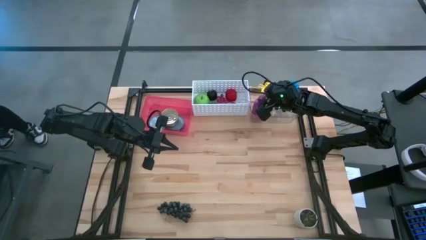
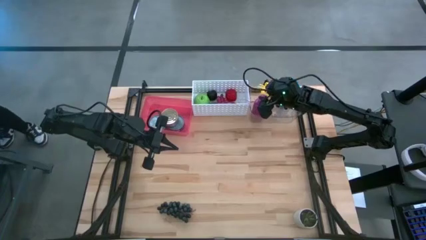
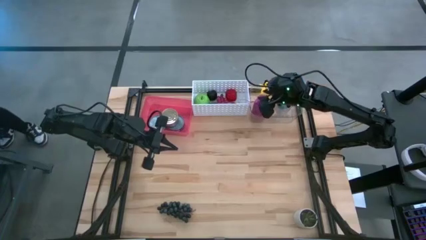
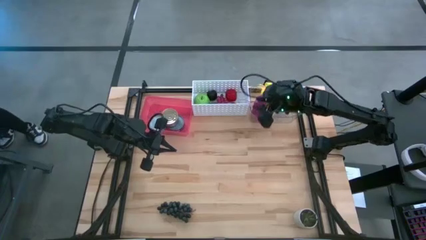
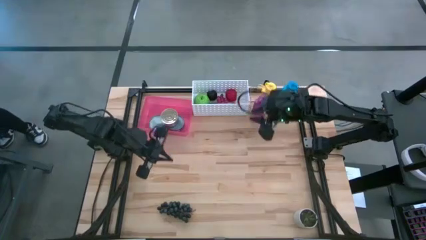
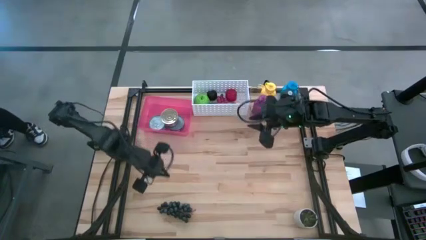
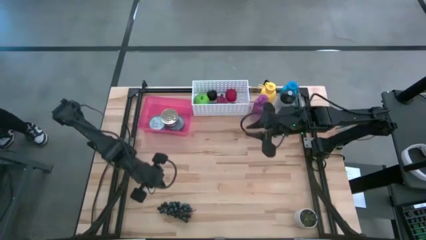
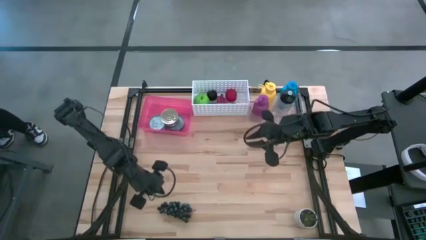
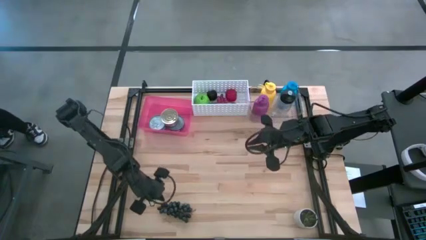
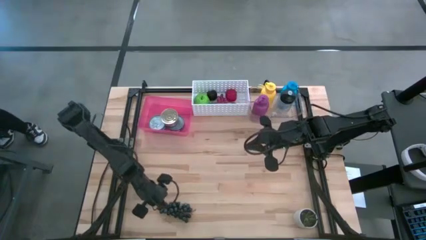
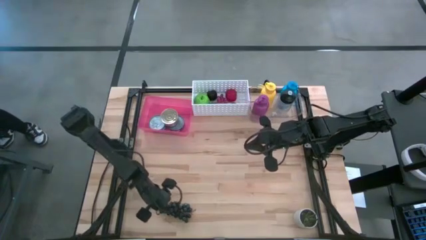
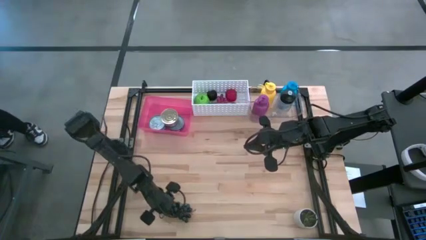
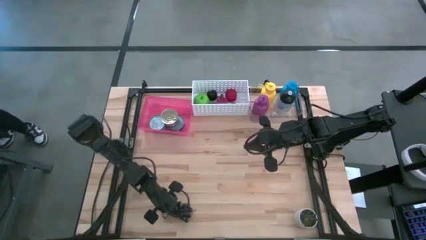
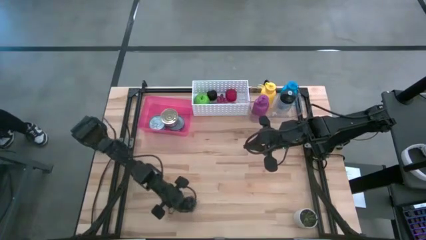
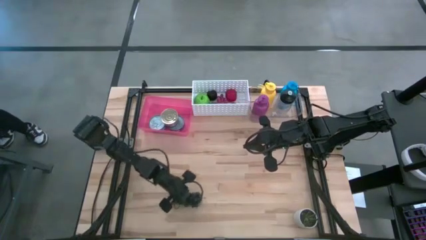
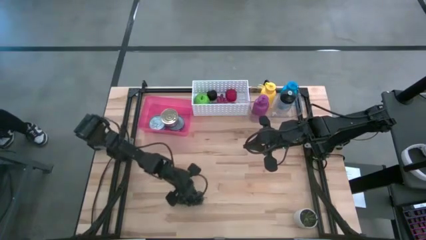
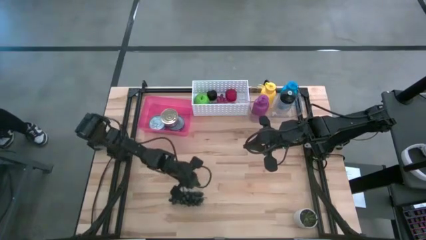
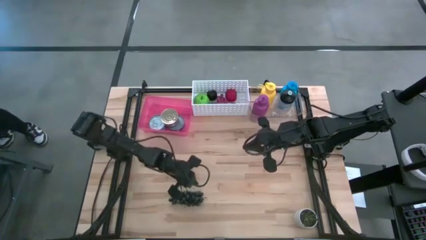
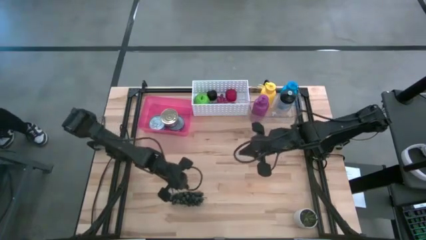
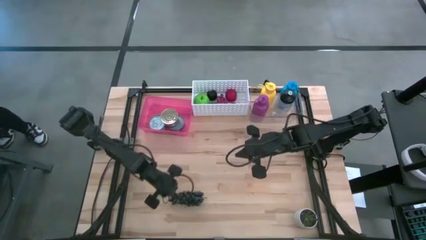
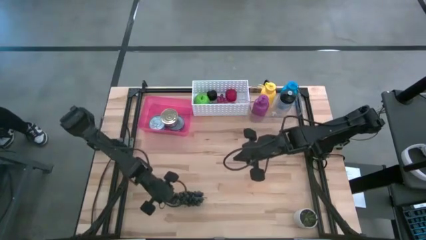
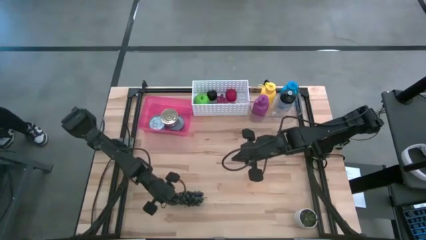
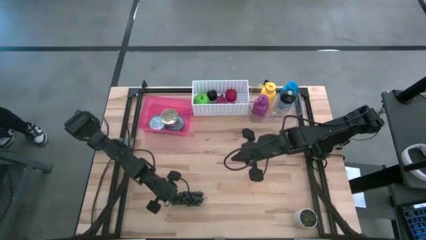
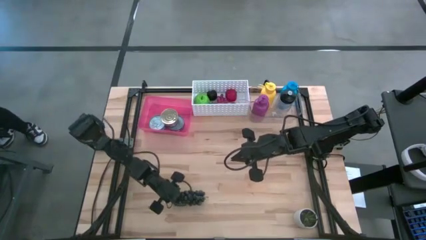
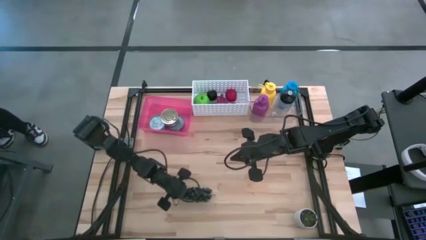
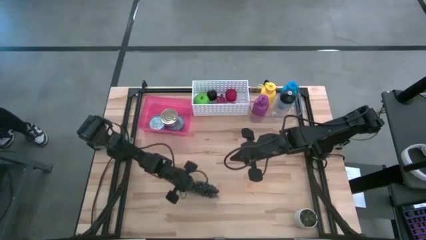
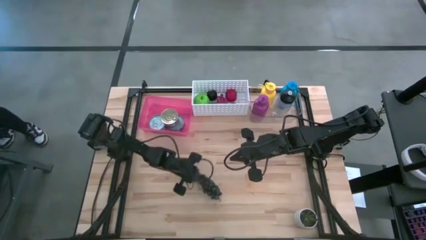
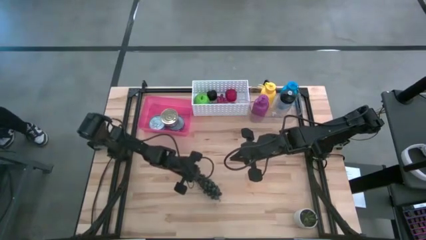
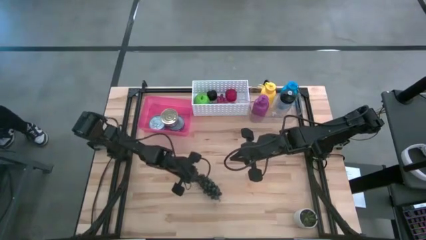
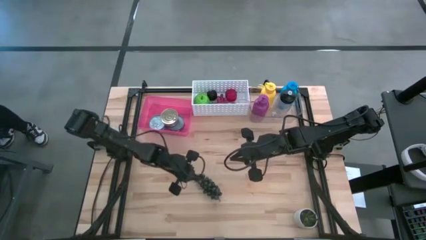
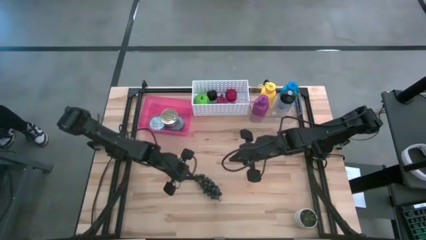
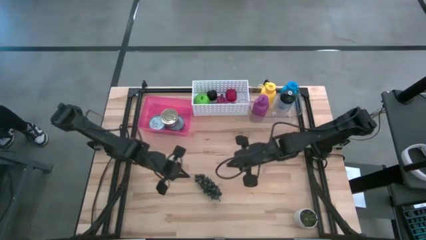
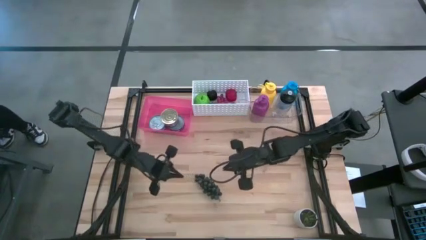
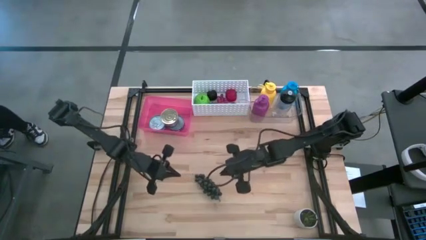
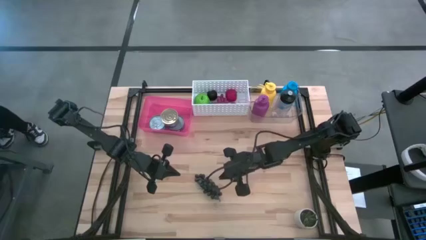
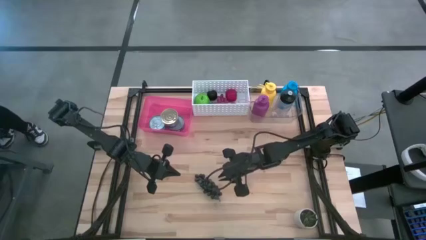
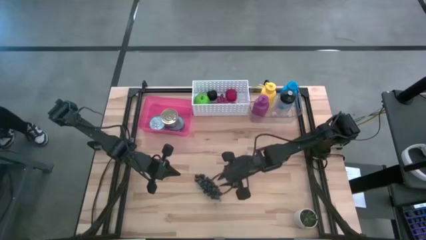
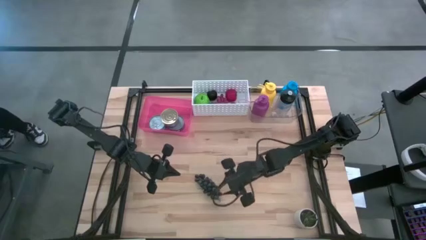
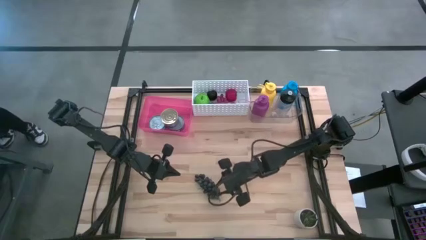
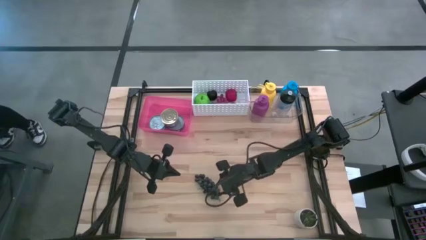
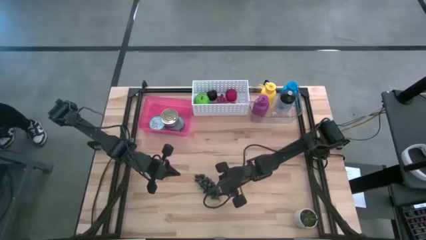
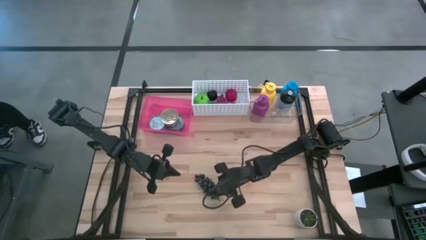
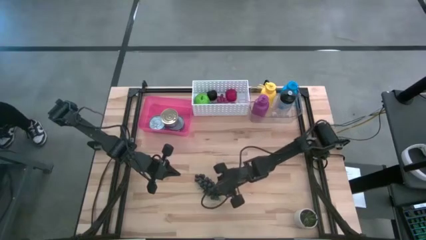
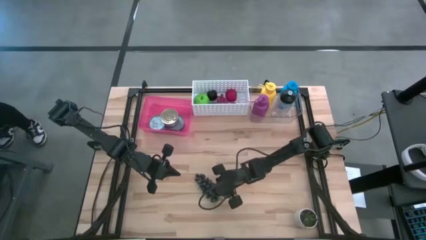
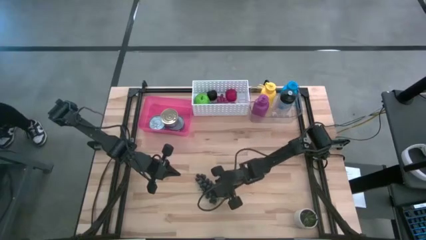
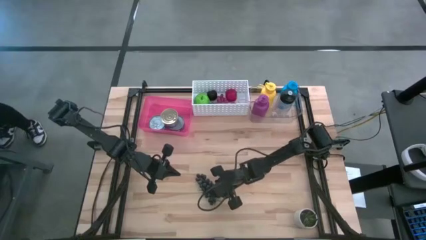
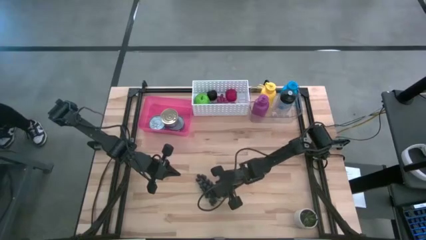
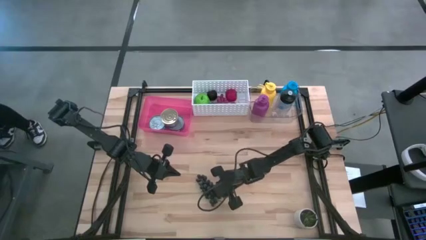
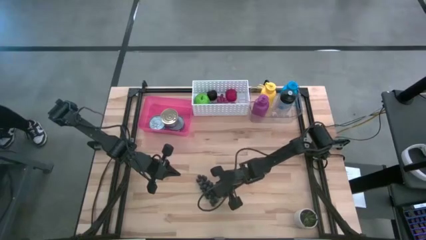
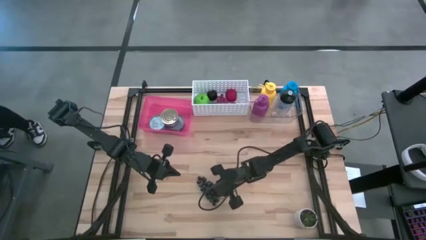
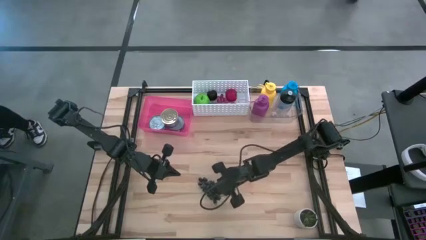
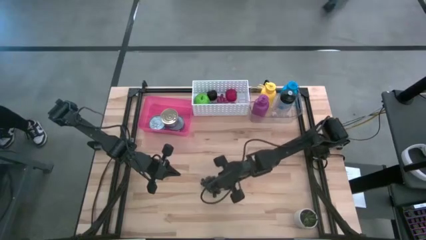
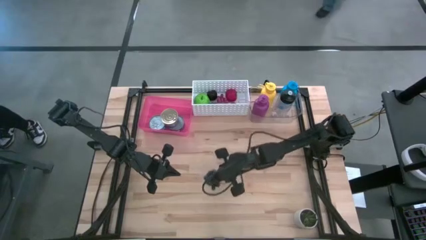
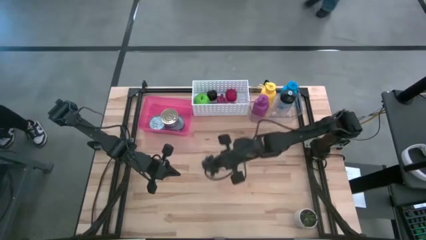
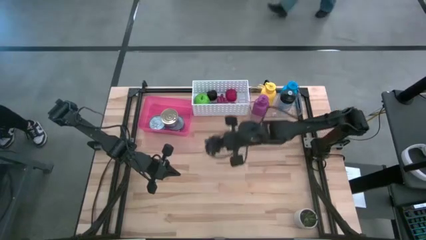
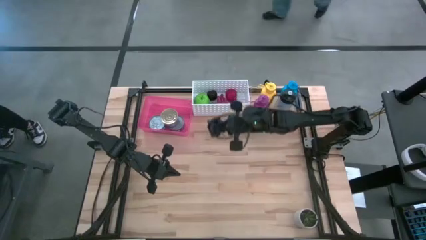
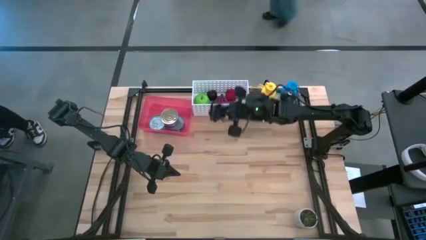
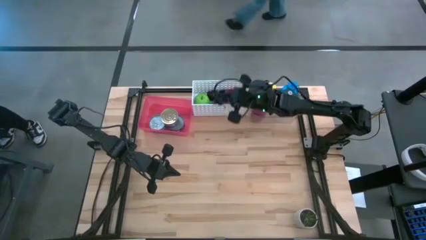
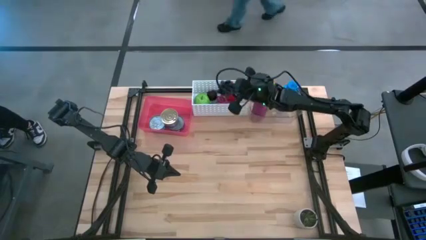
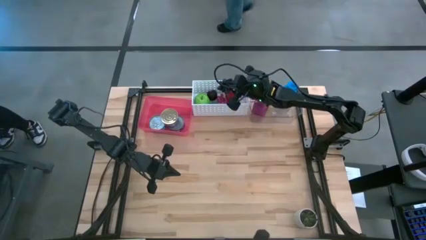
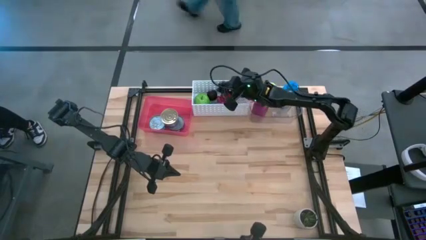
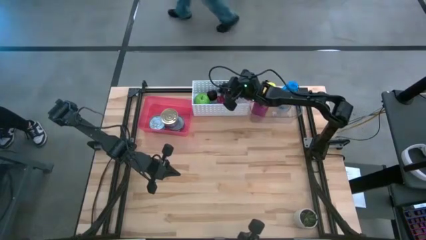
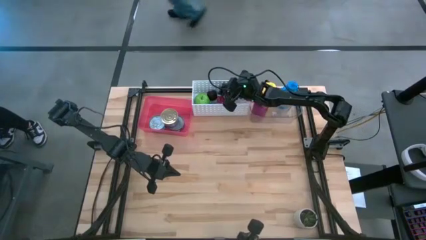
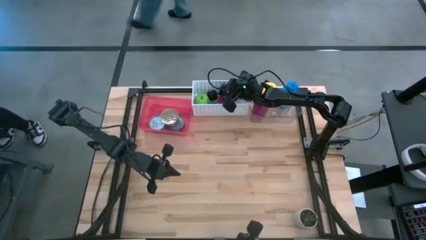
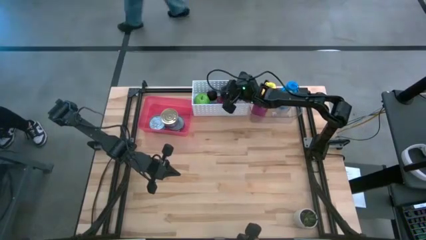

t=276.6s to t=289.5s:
Task: Pick & Place Food Item
Put the black grapes into the white bin

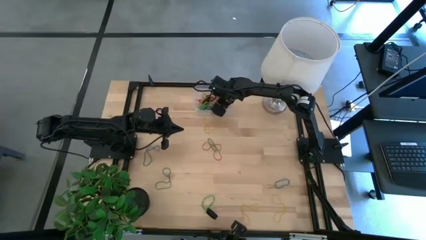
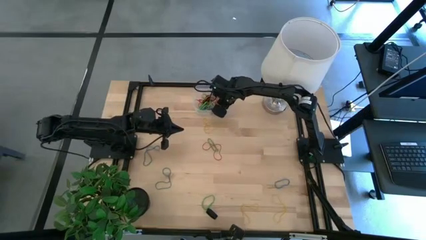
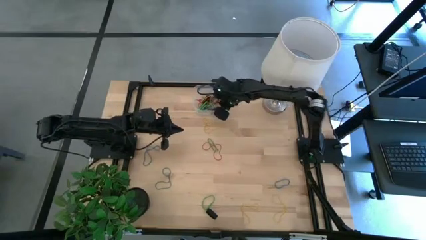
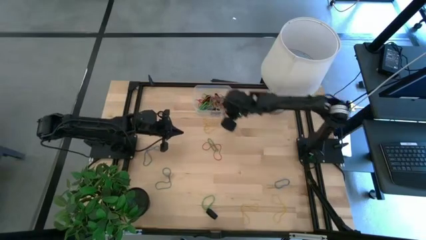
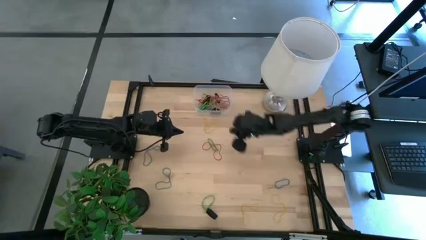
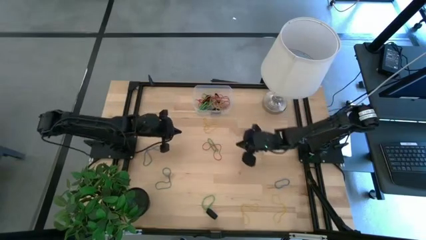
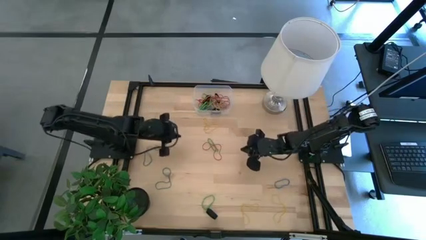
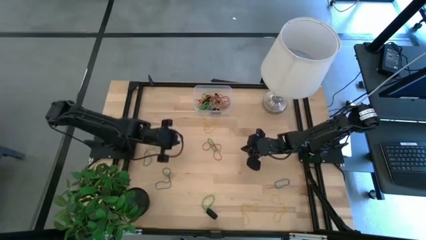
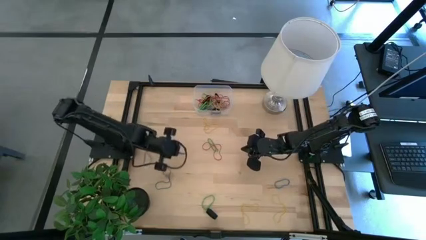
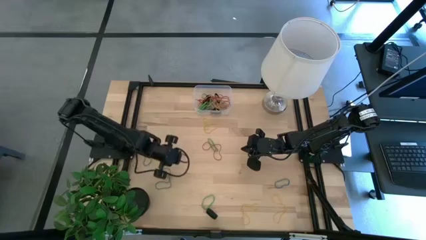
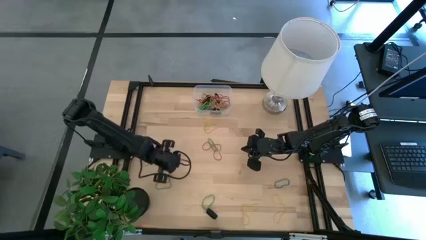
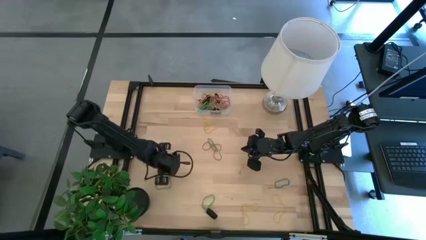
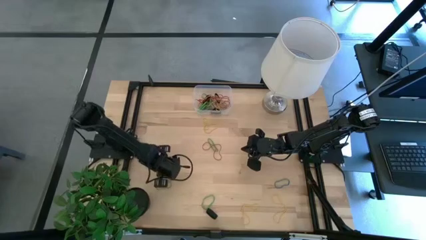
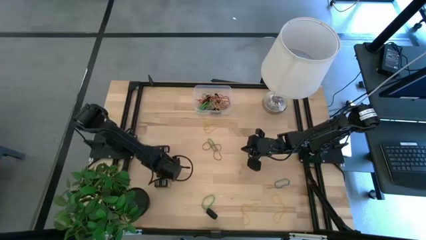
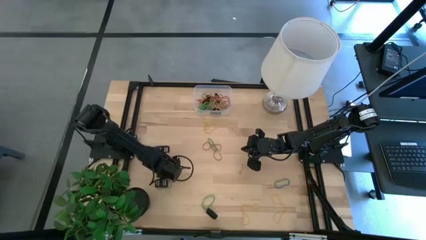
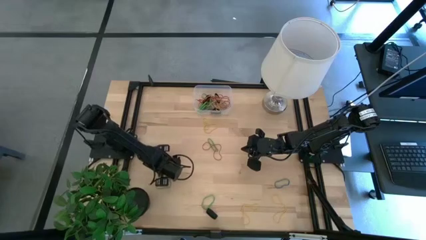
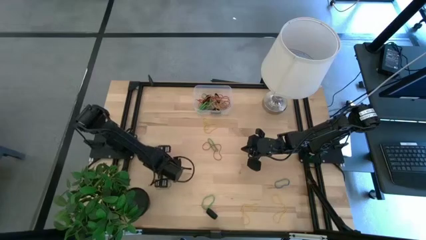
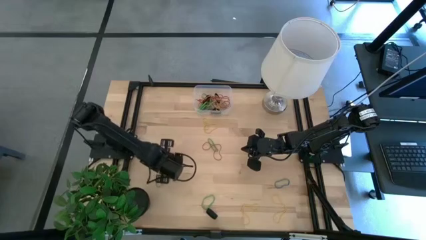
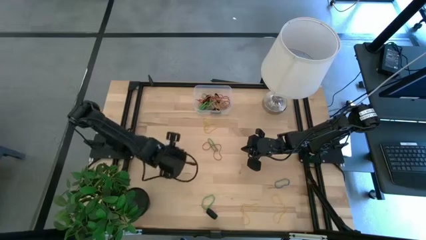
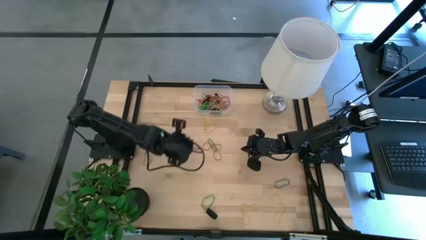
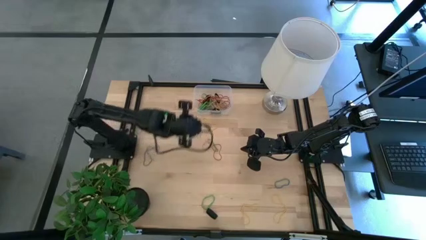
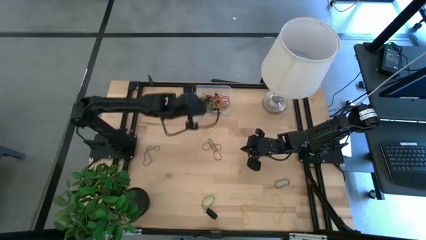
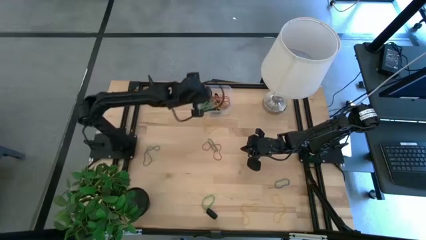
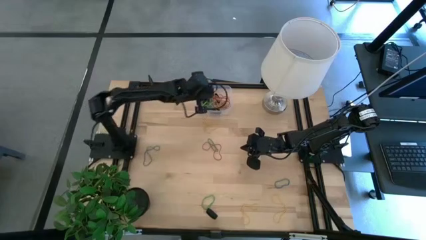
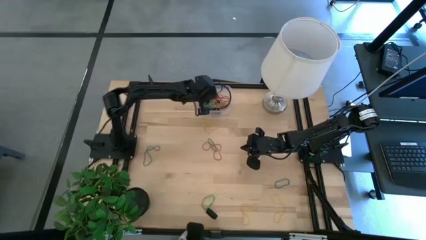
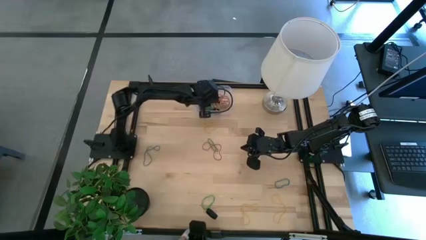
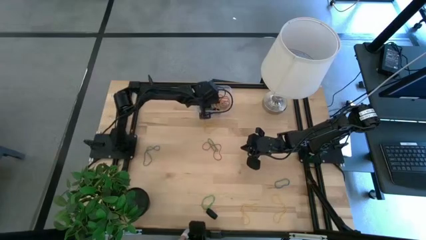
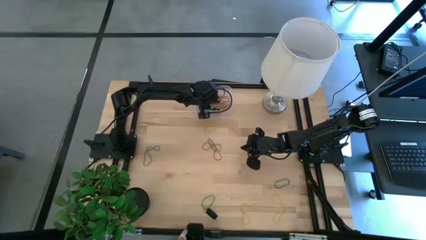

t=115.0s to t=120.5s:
Task: Pick and place rubber bands into bin
Put the blue rubber band into the transparent bin
